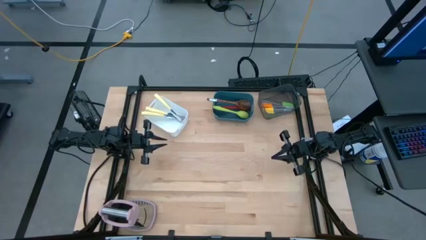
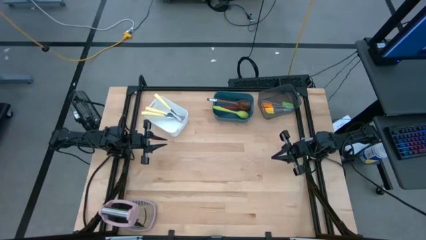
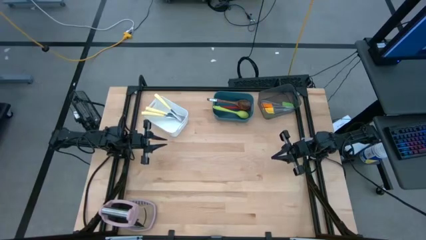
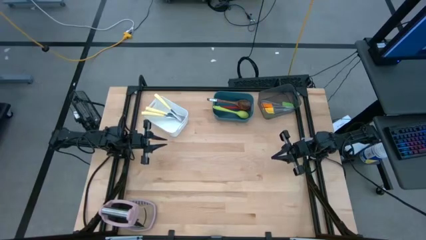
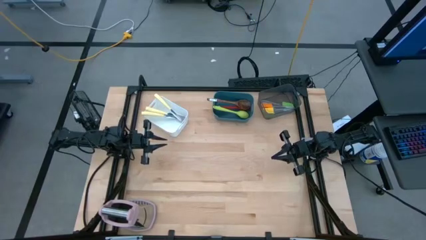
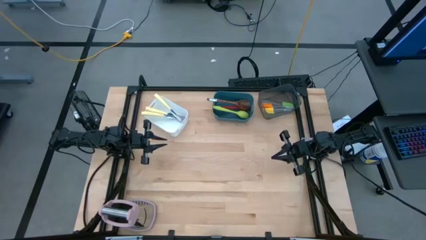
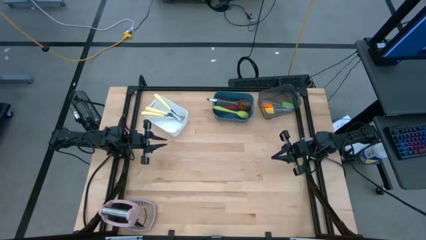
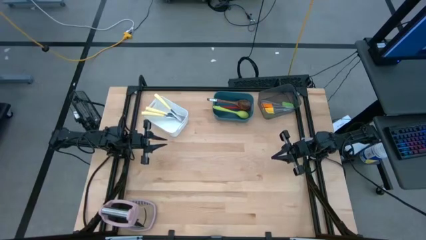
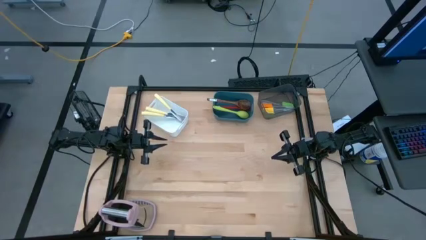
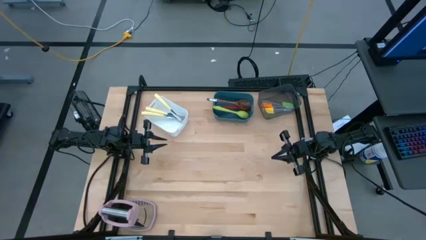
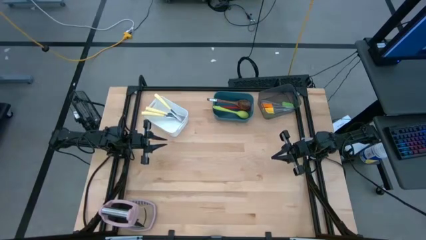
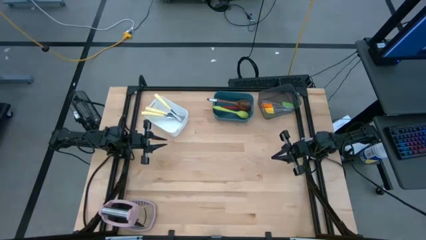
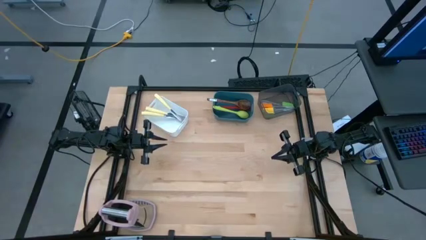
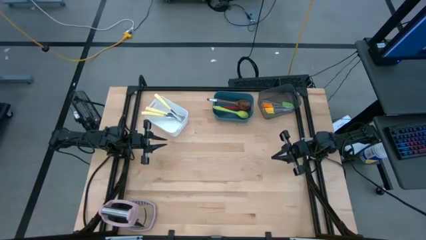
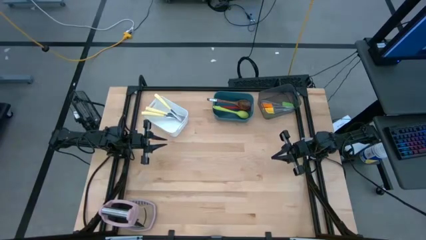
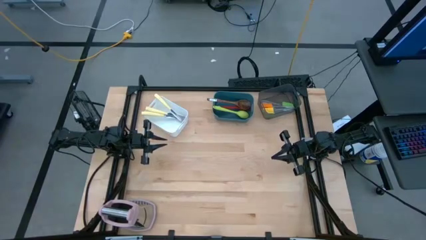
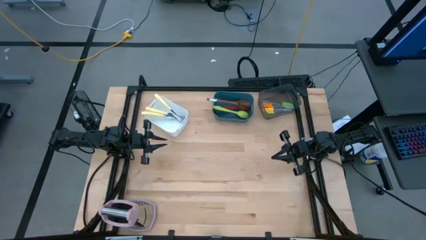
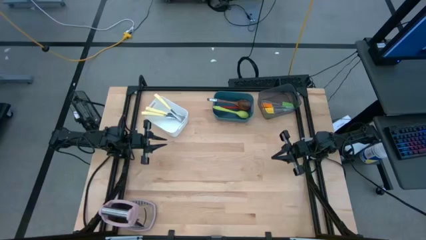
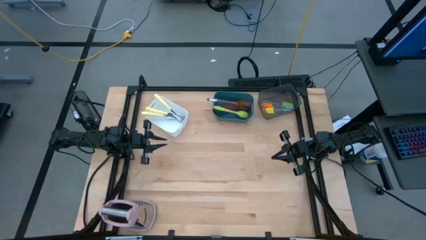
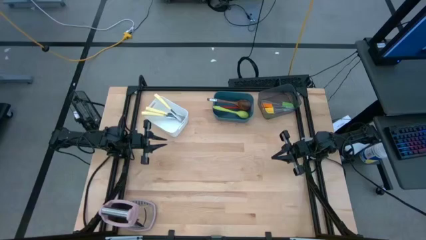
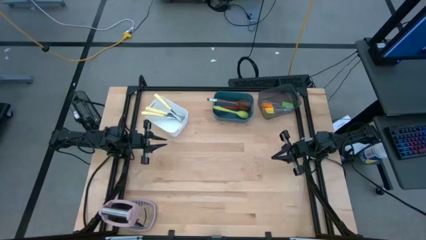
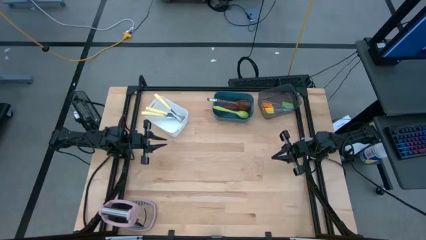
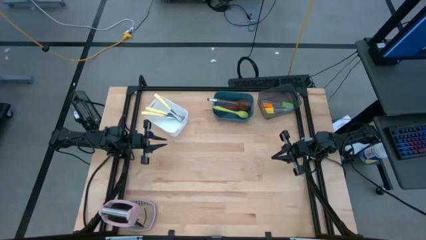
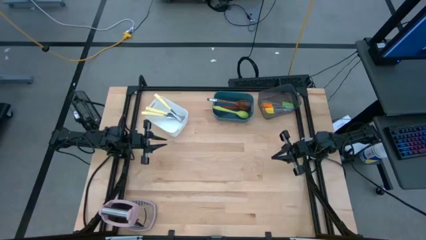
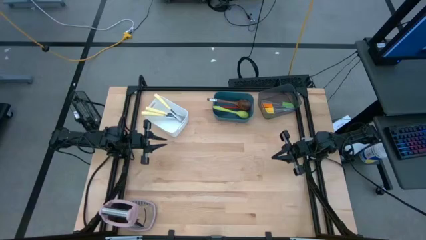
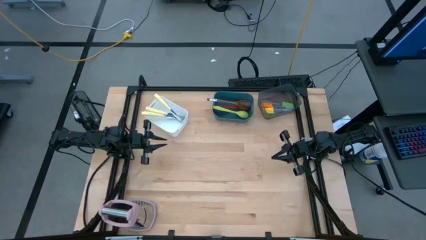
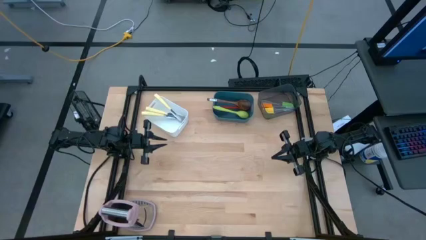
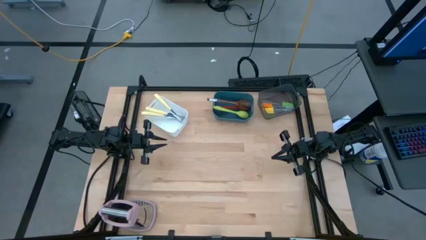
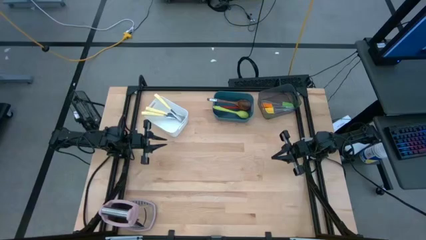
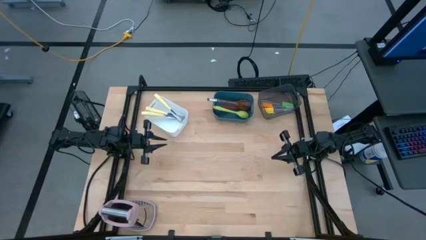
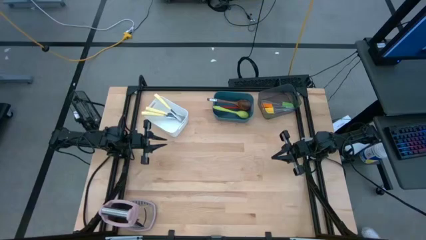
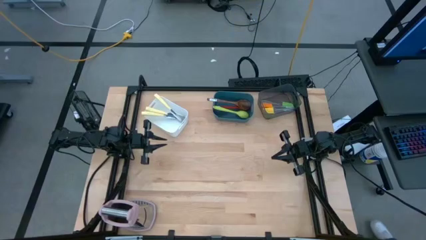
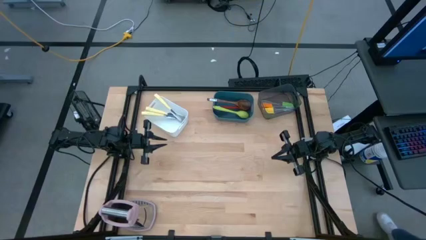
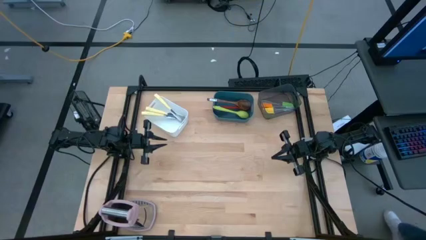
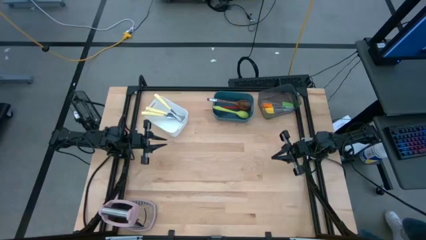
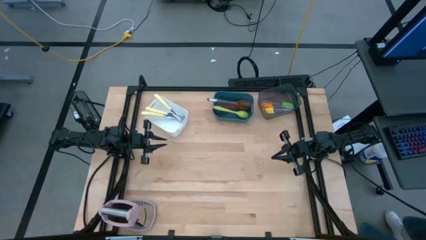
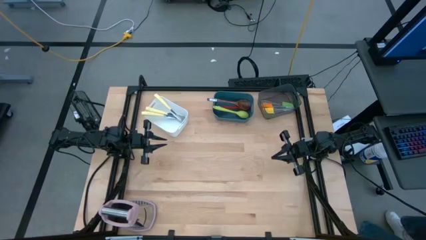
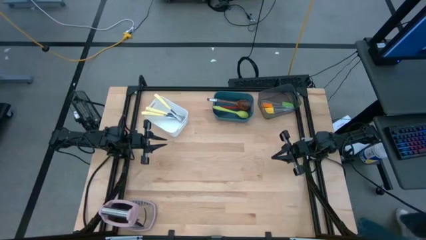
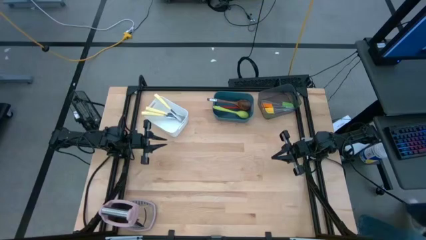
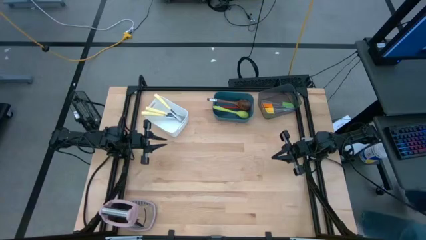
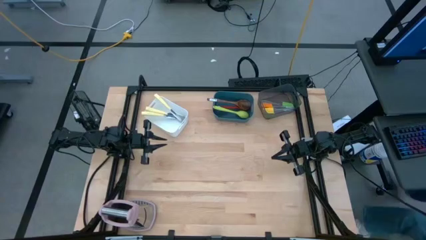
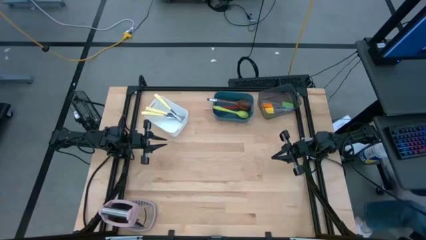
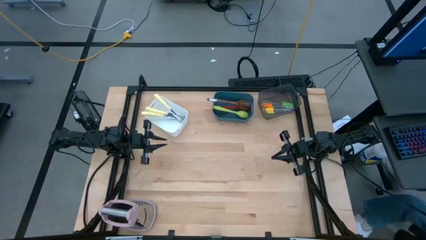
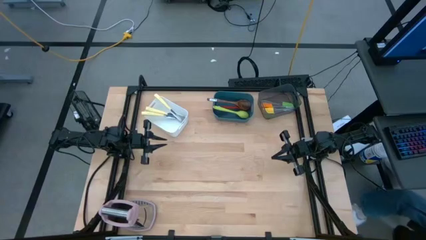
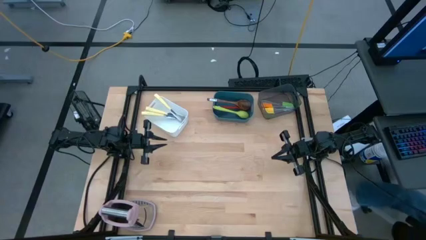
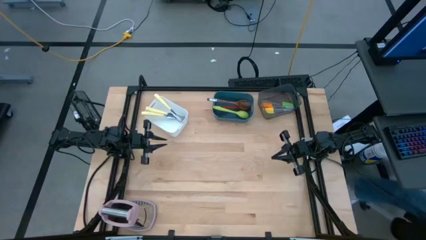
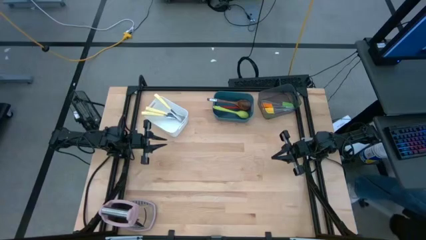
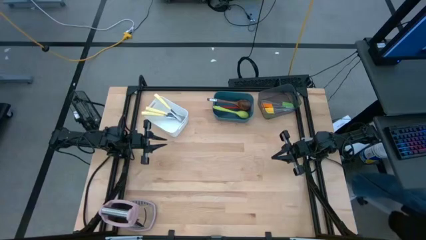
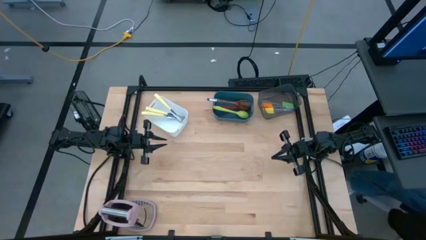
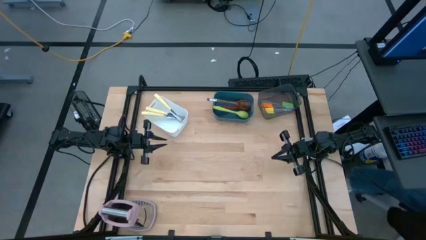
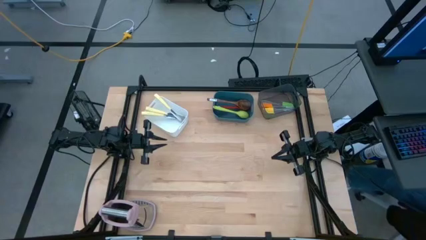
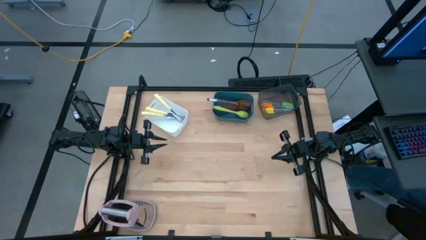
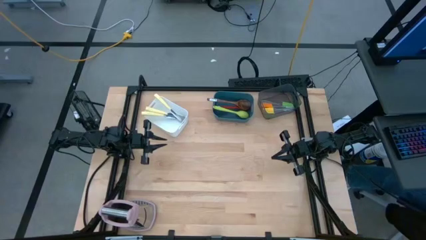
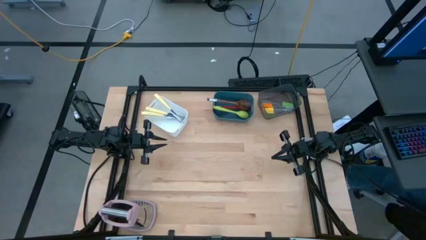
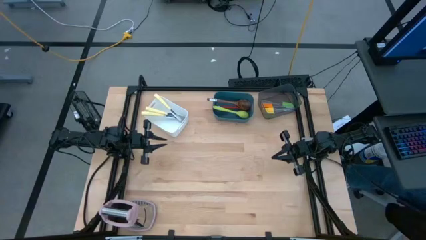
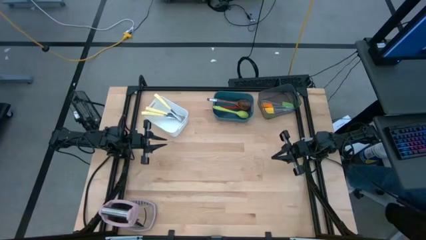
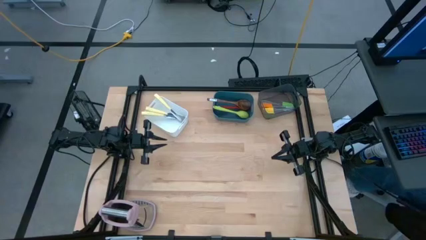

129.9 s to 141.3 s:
Task: Pick & Place Kitchen Items
Return to Home Position

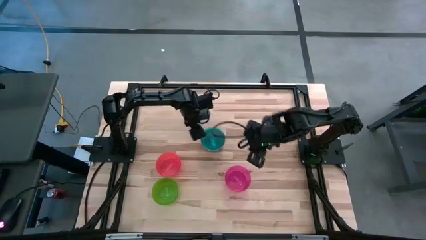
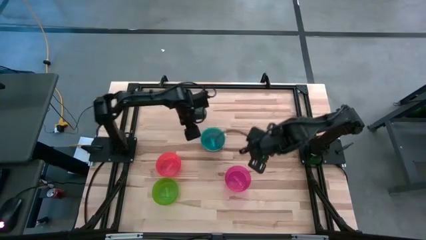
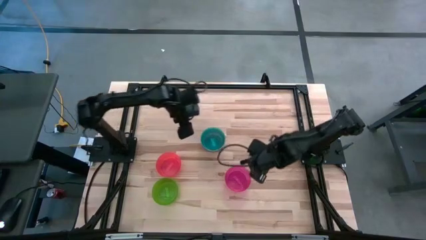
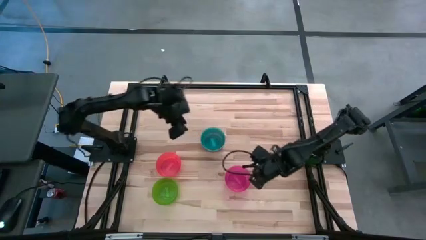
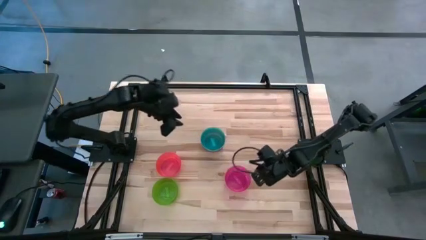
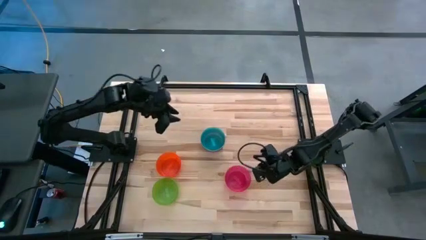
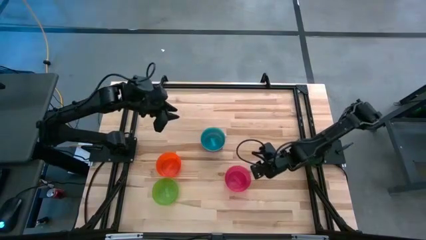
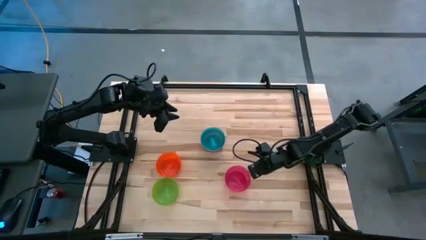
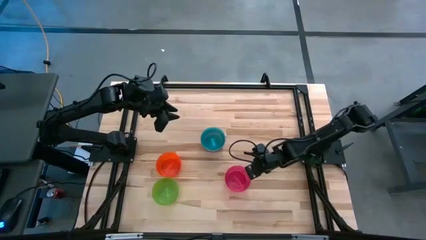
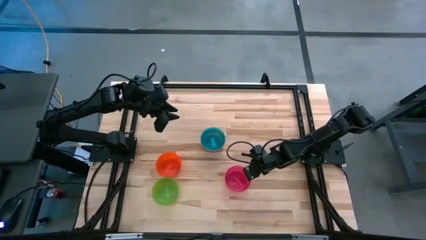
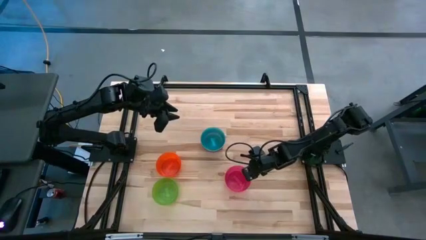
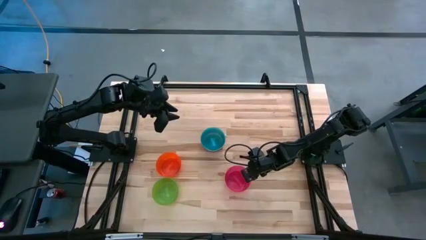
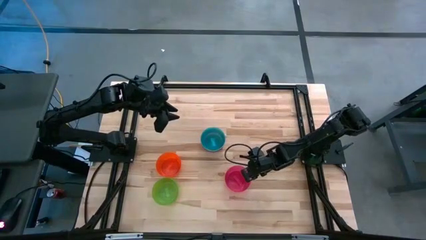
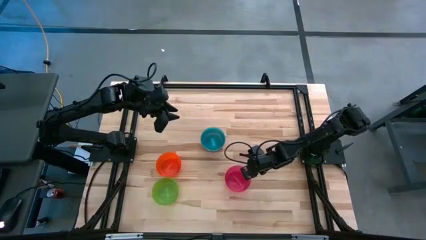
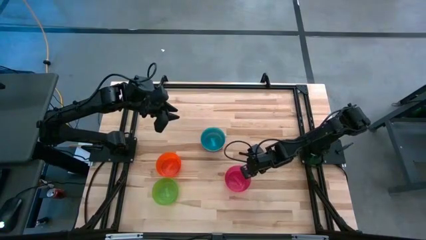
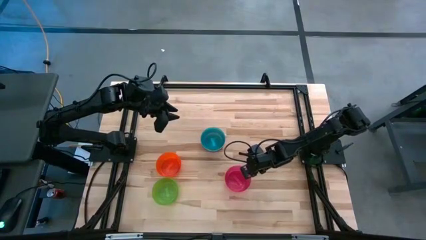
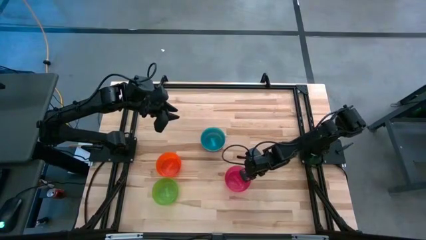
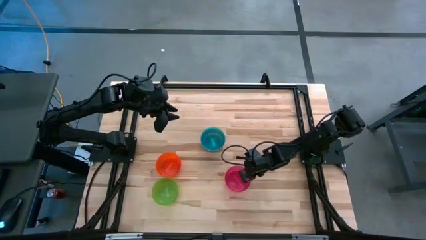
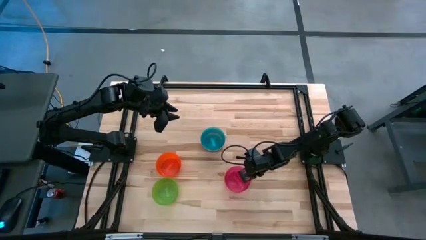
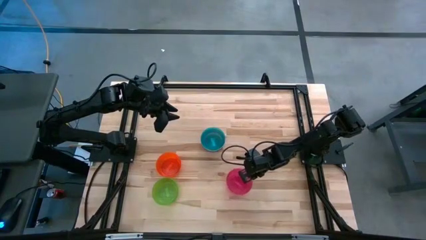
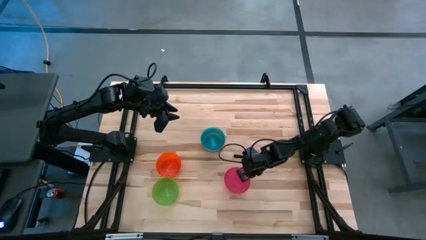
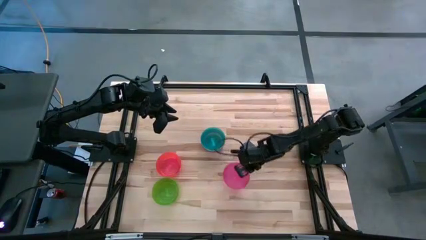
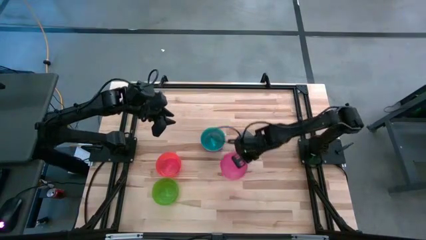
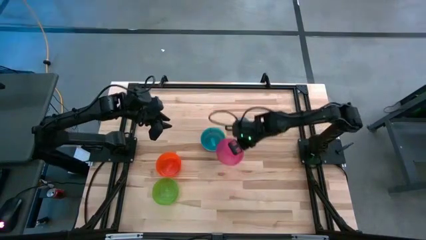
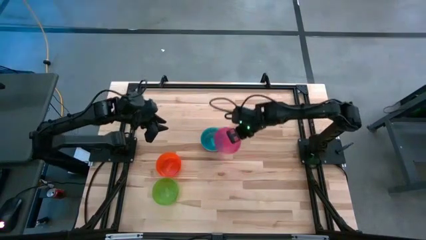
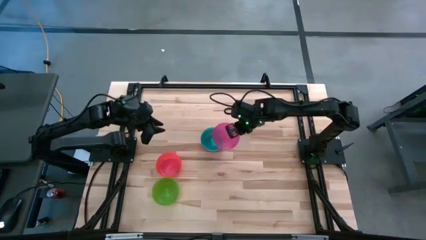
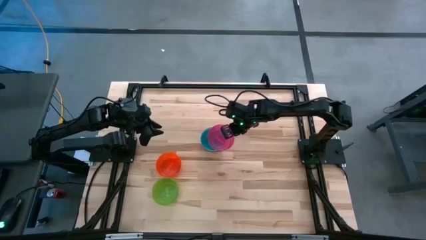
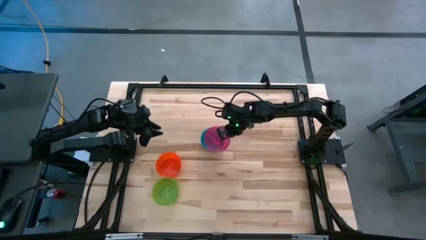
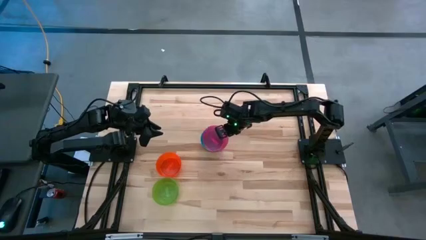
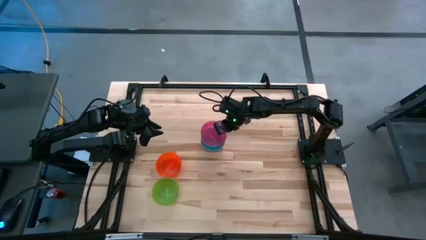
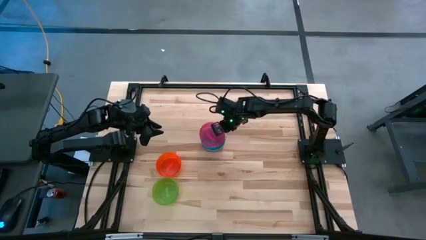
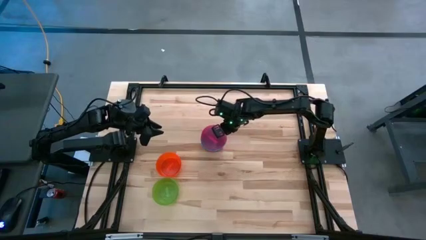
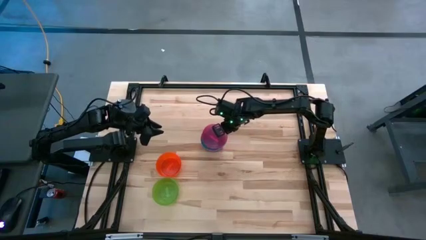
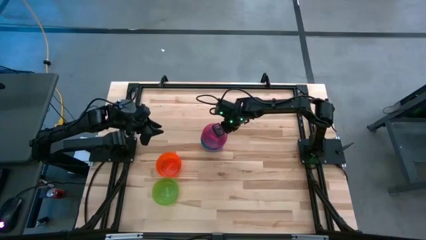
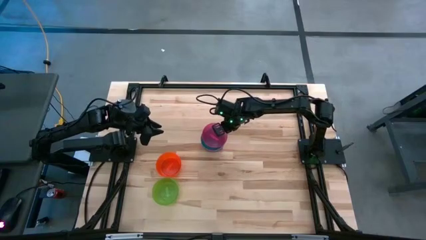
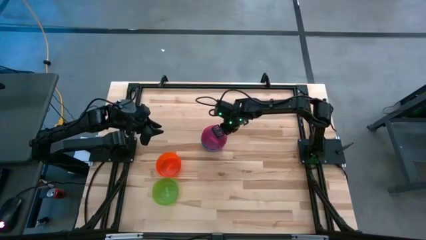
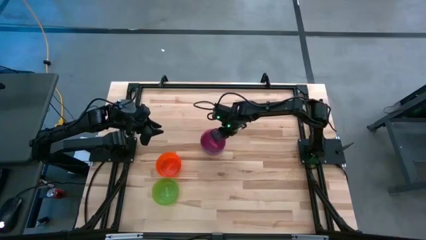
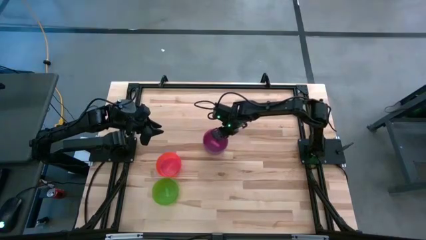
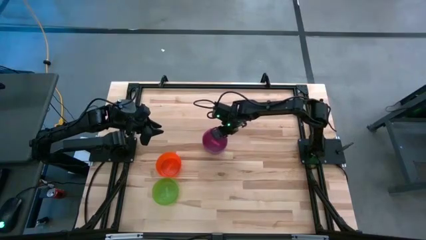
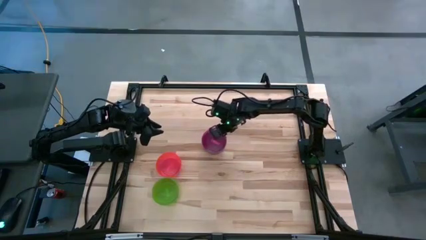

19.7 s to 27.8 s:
Task: Nest bowls inside each other
Stack the pink bowl on top of the blue bowl
